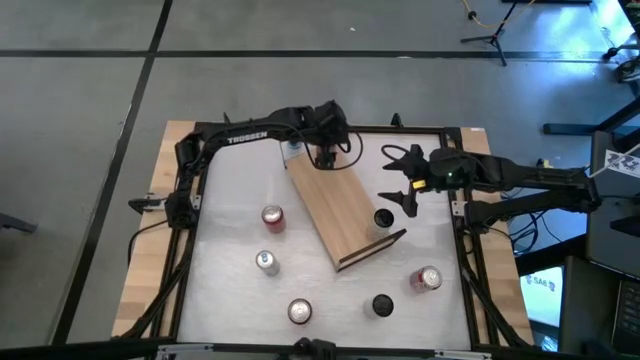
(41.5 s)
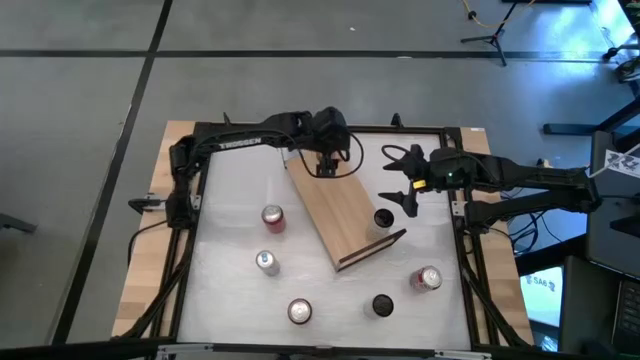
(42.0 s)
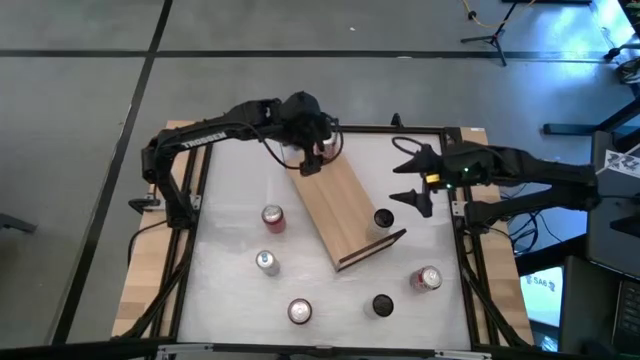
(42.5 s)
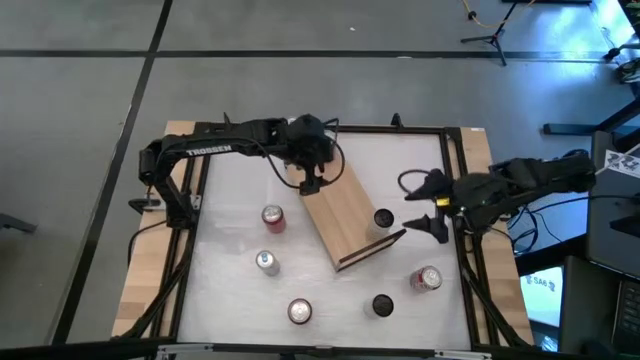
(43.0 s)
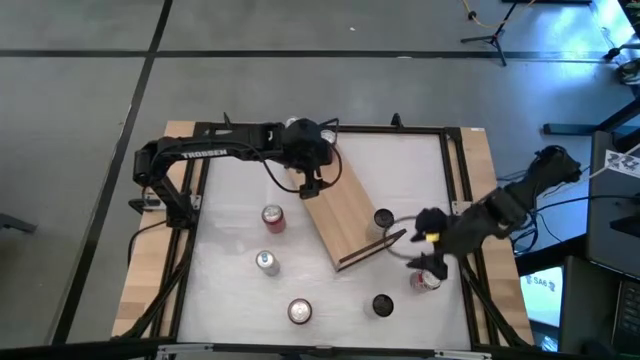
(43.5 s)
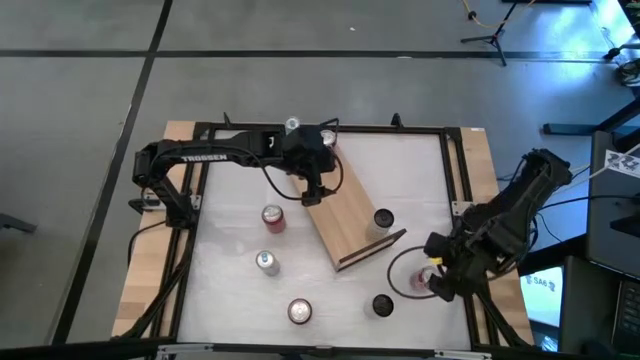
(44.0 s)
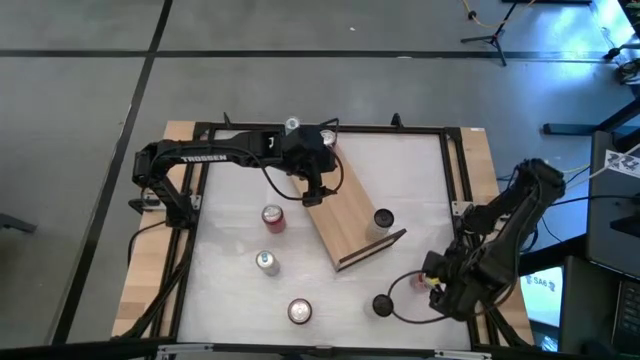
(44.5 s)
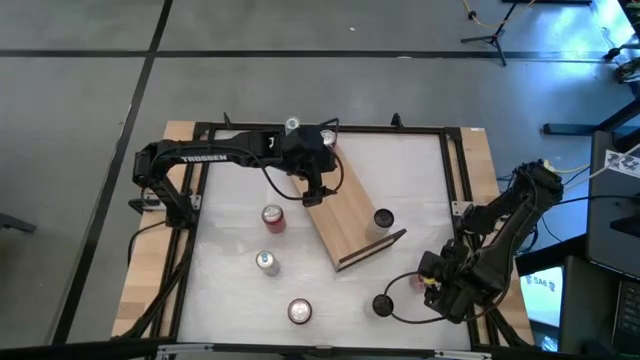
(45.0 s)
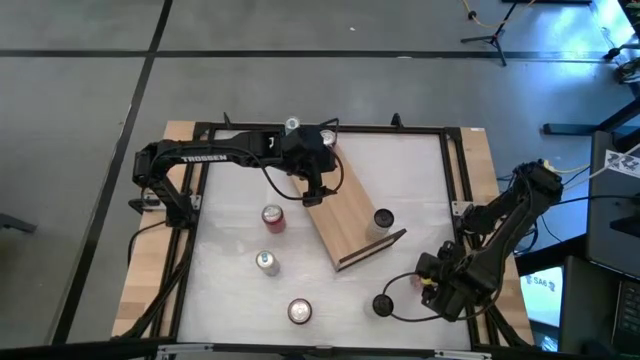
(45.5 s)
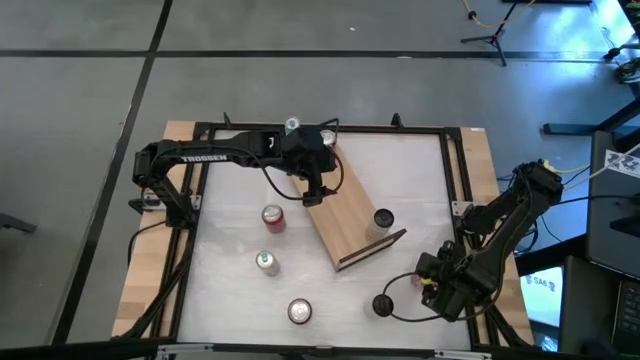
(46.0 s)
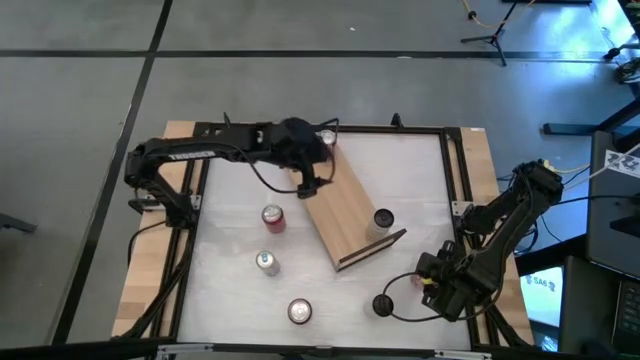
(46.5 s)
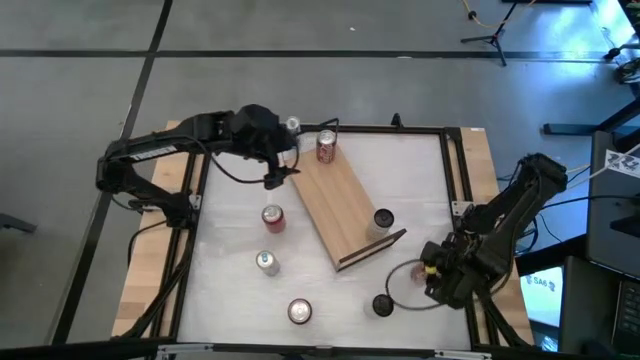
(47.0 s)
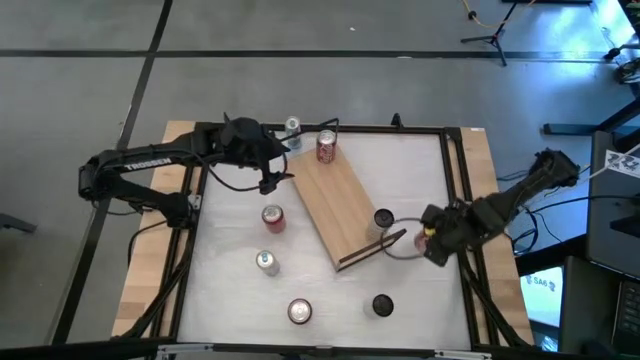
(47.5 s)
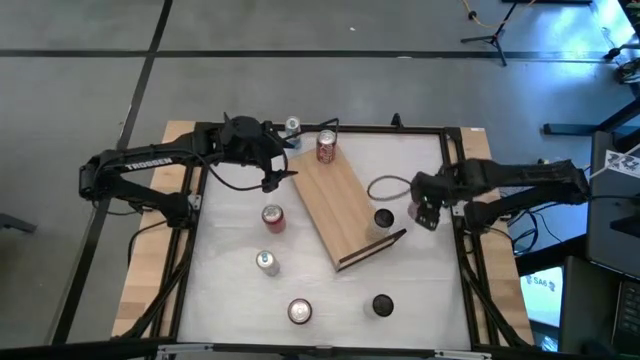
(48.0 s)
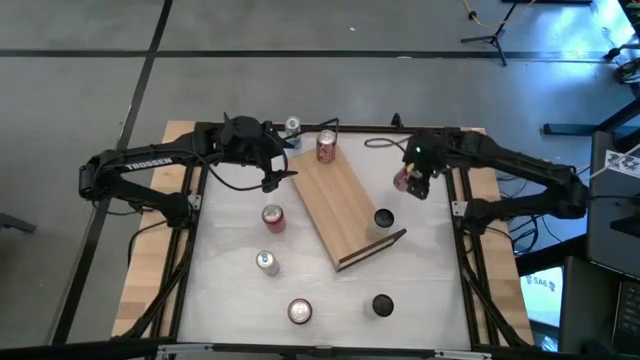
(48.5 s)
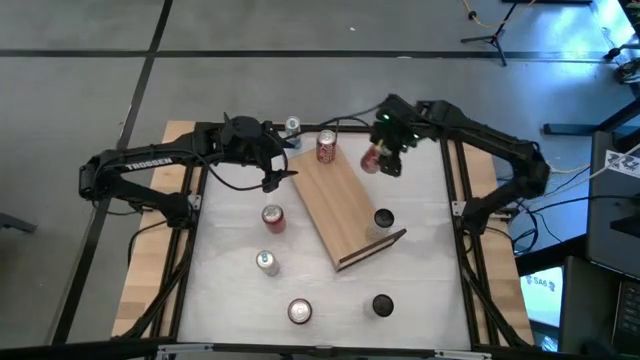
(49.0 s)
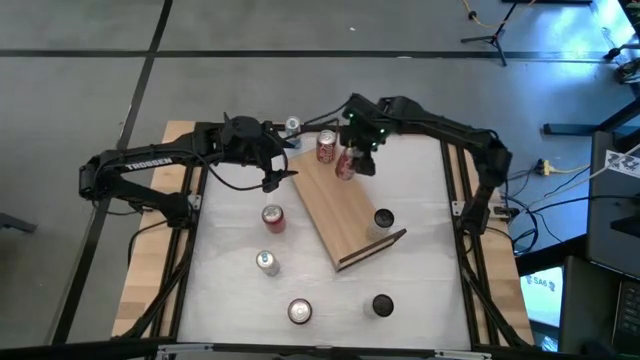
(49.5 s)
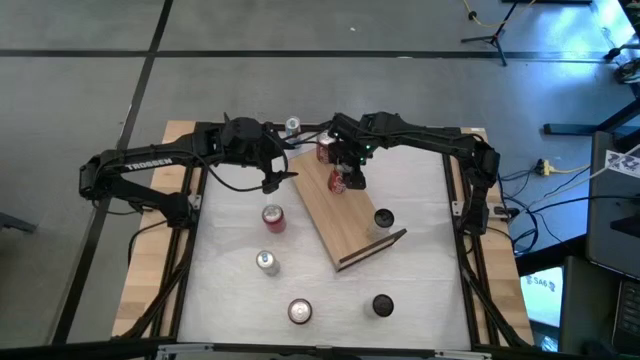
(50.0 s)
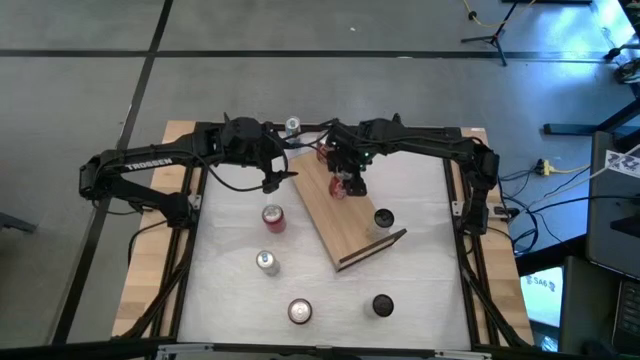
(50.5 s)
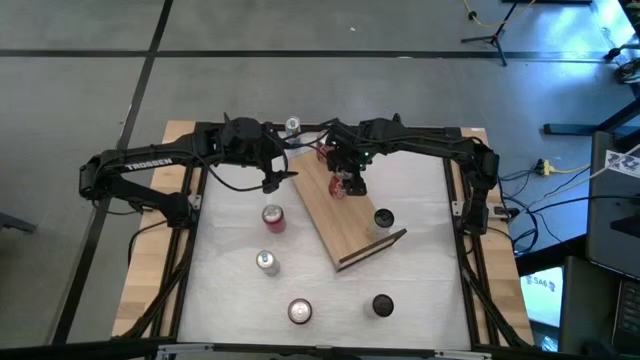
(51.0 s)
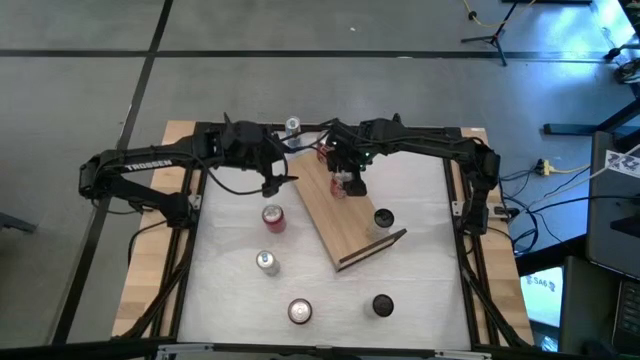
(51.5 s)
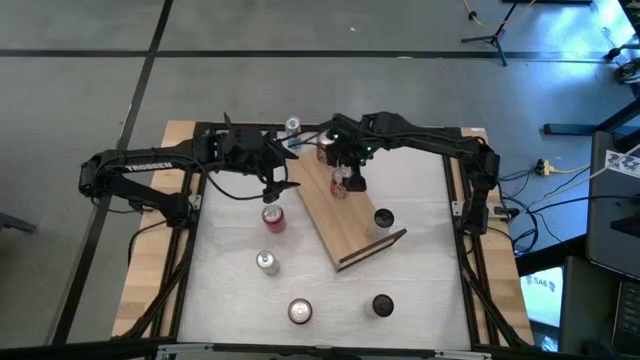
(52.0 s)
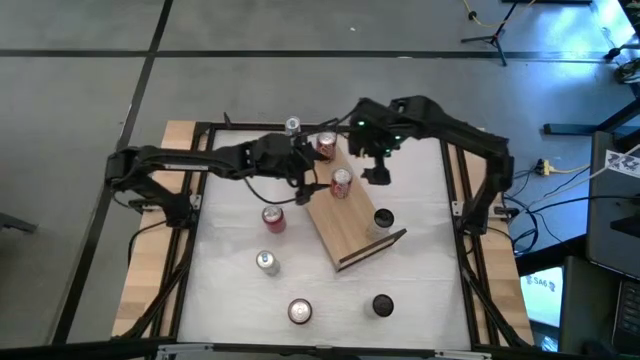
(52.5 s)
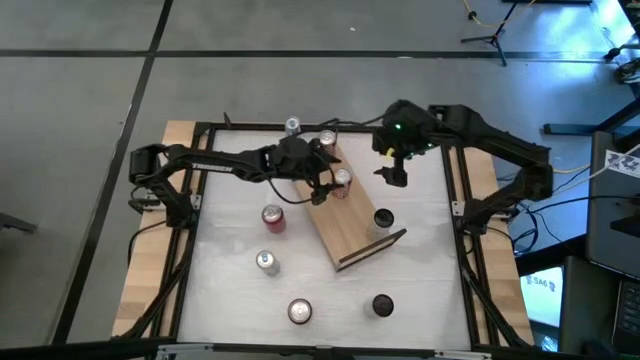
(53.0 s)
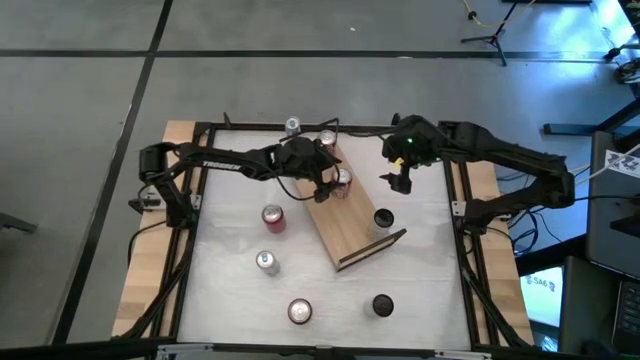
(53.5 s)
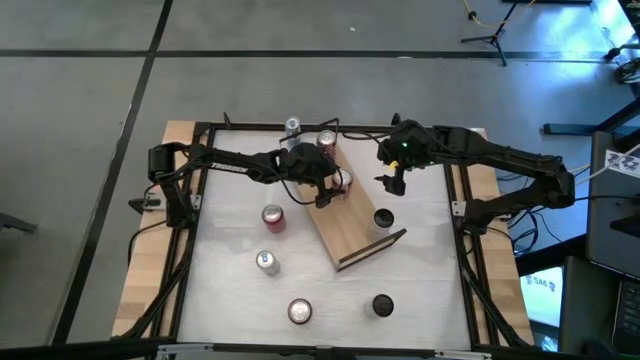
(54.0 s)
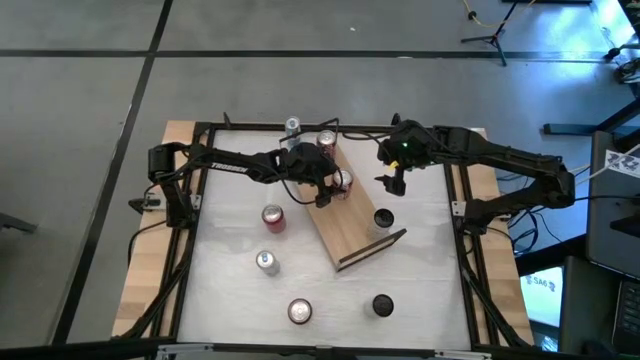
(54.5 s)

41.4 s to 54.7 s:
Task: Place canned beverage on shelf
Put the red white soda can on the shelf aligned with the other red white soda can

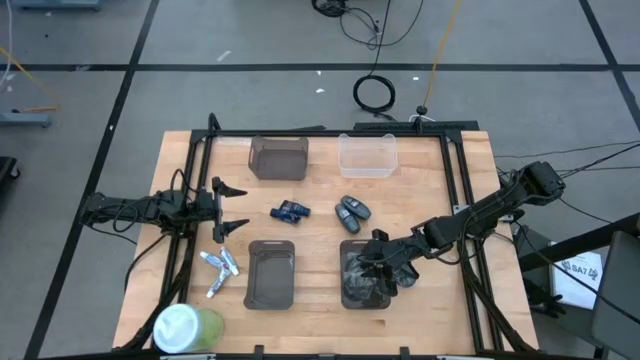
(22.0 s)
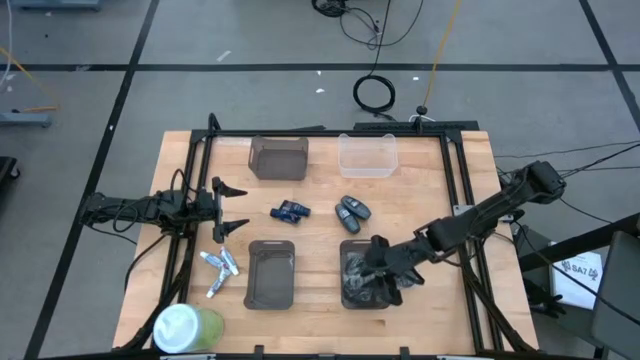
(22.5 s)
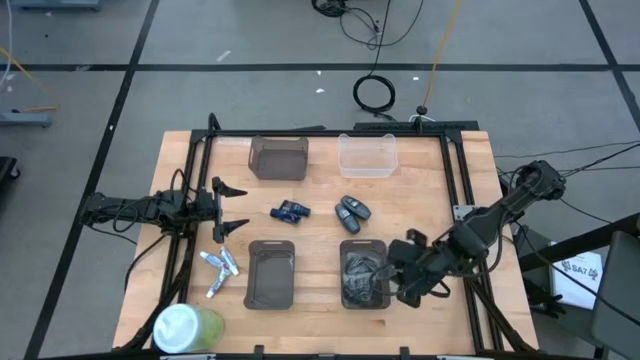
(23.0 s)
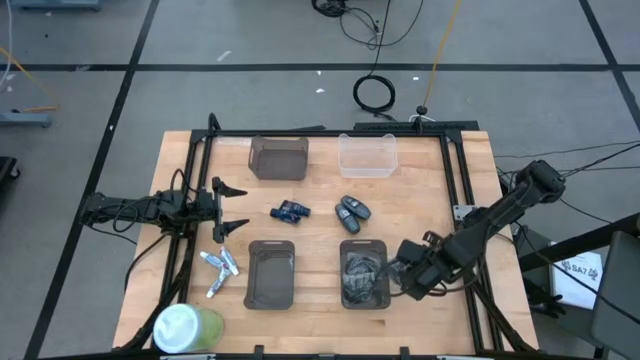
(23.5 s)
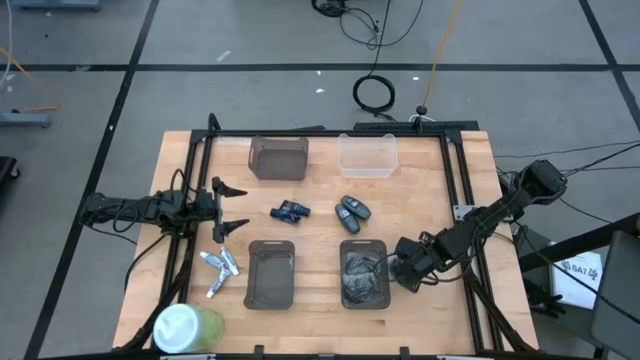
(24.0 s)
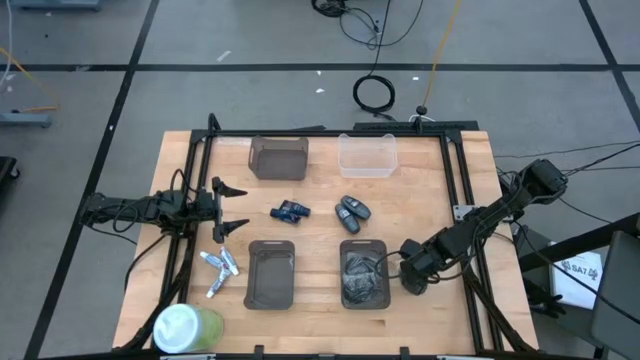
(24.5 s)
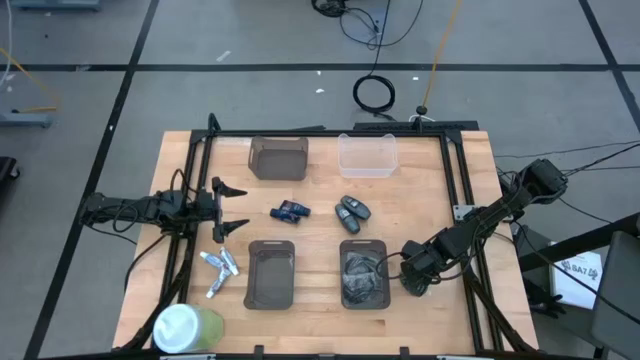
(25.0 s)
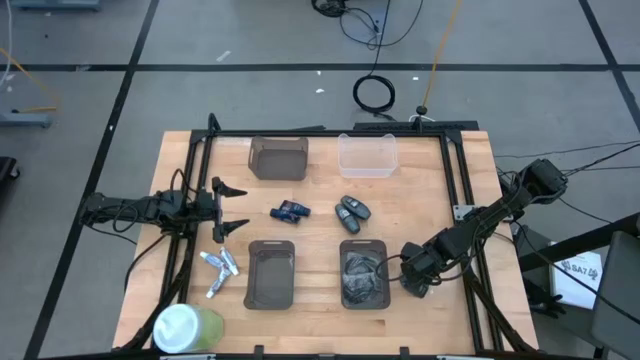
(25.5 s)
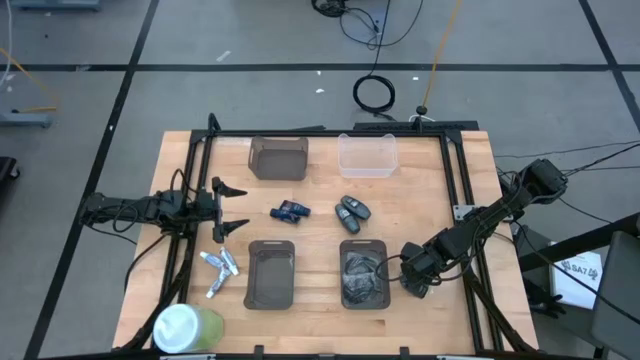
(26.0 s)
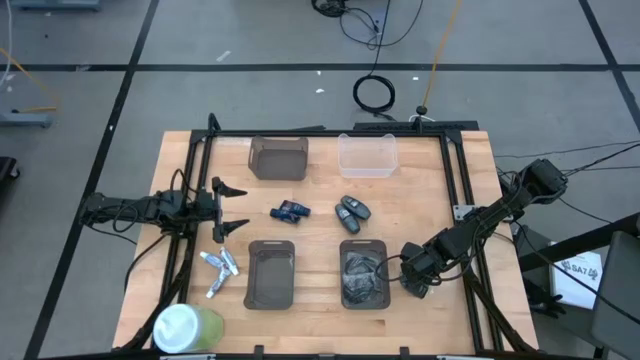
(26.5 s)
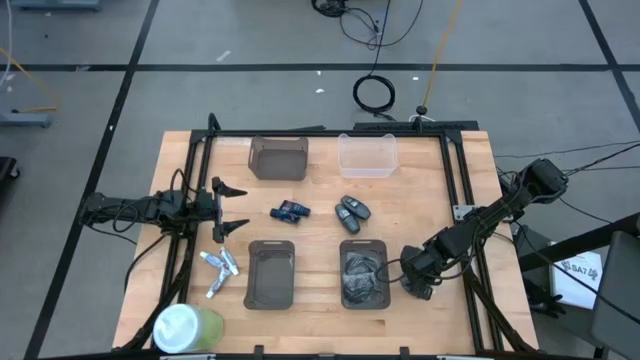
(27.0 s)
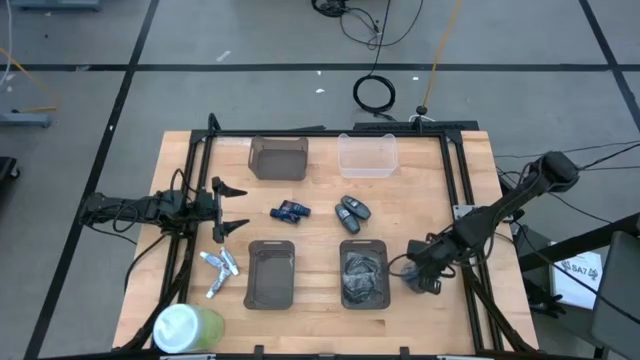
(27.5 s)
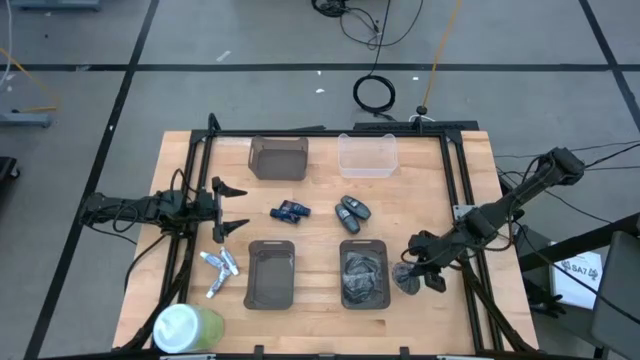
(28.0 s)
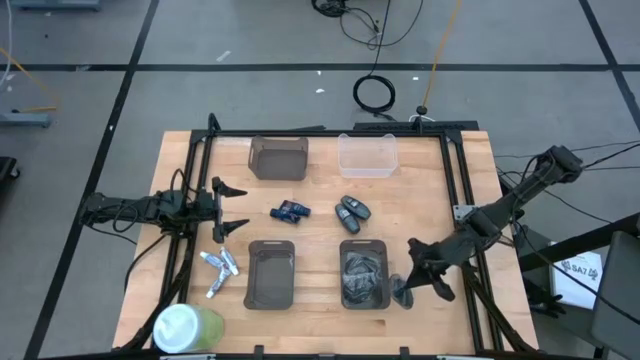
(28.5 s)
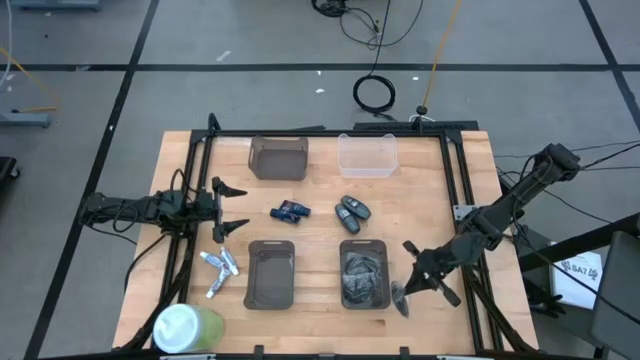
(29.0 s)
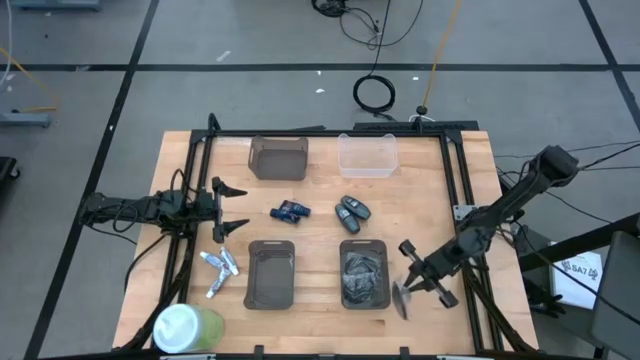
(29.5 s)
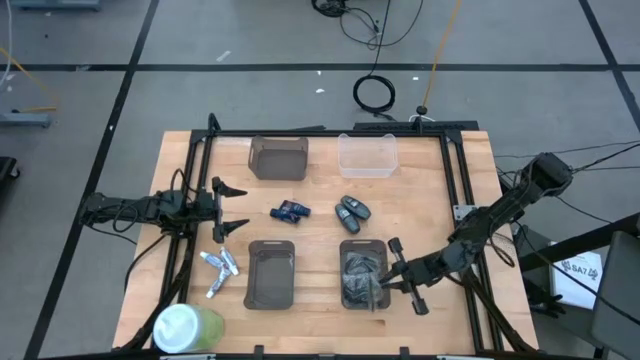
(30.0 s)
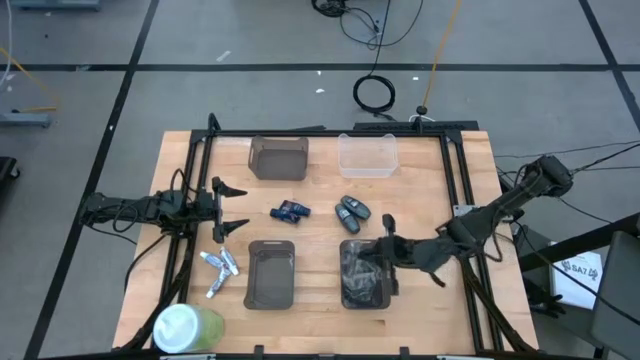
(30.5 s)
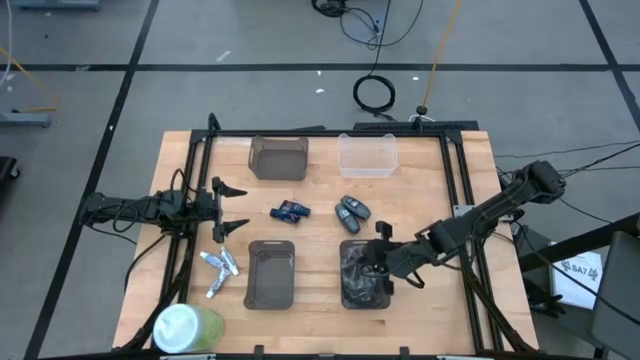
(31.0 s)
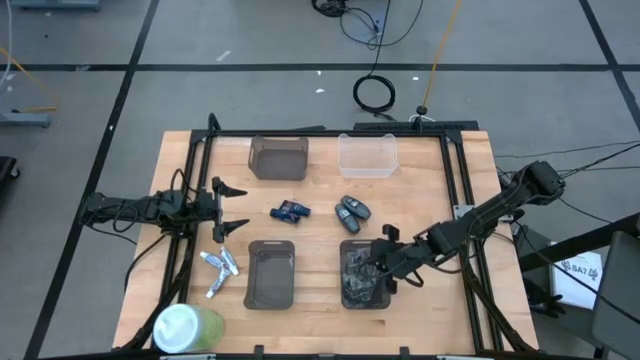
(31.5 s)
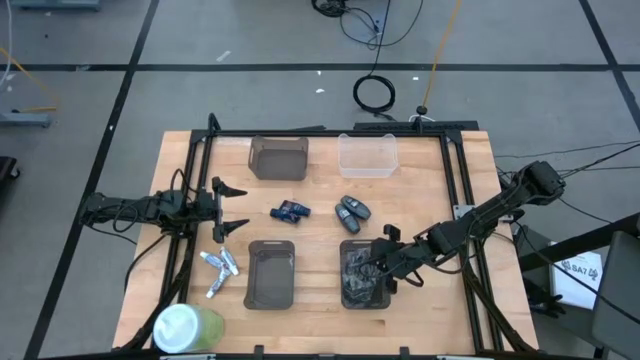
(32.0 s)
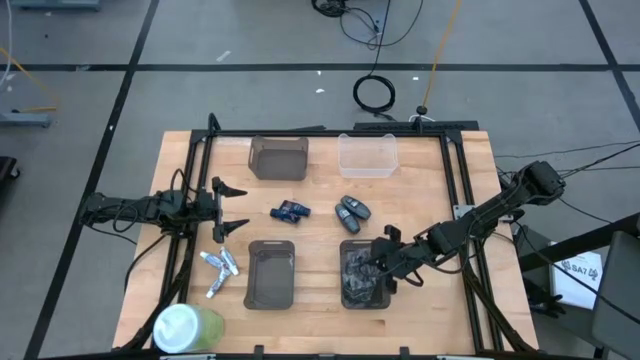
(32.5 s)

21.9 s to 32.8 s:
Task: Pick & Place Travel size toiletries
Put the black hairbrush into the bottom right black bin
